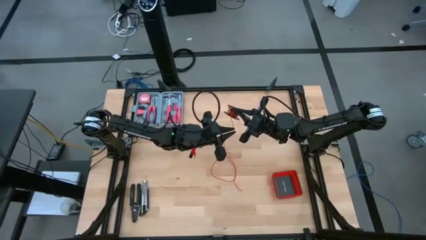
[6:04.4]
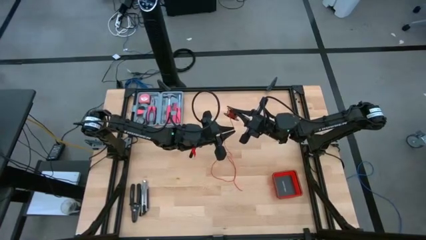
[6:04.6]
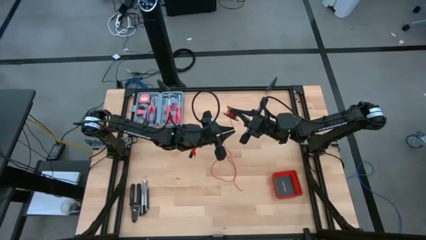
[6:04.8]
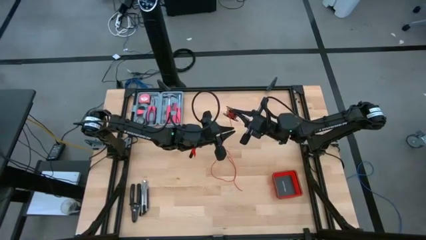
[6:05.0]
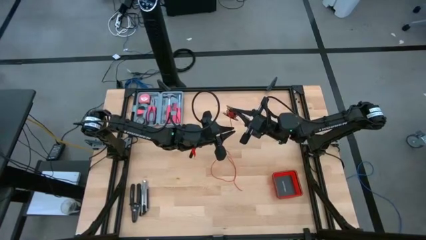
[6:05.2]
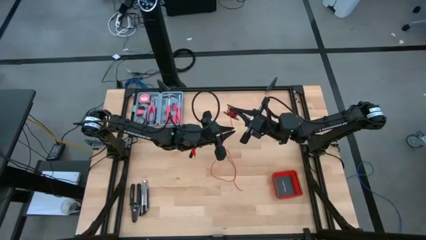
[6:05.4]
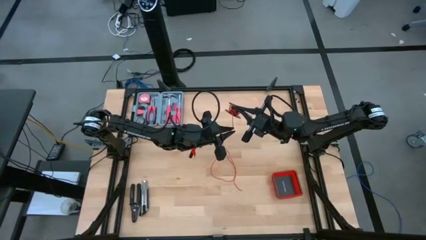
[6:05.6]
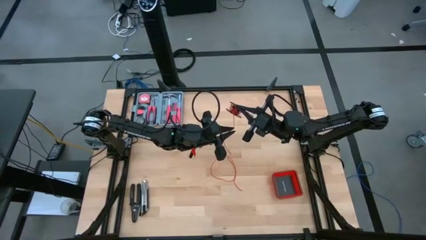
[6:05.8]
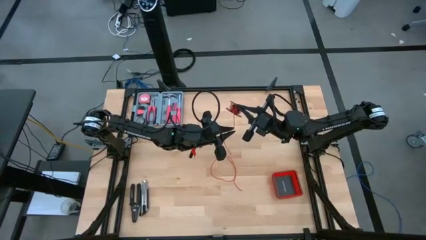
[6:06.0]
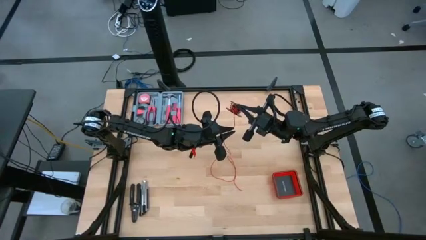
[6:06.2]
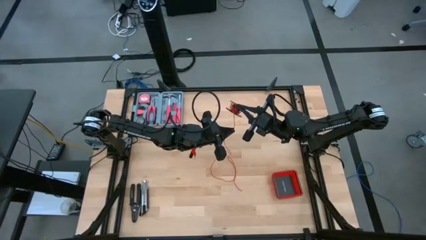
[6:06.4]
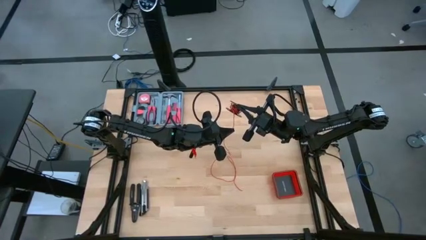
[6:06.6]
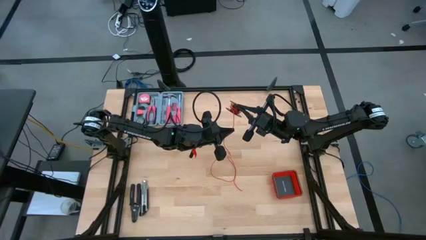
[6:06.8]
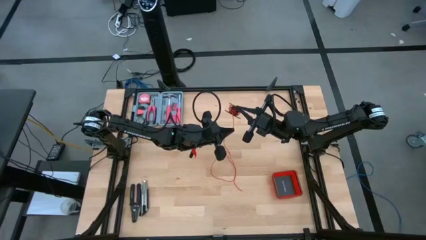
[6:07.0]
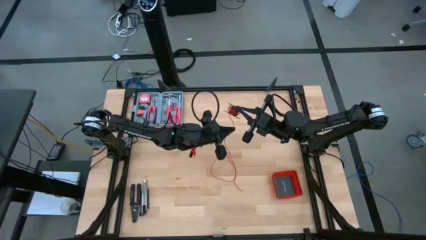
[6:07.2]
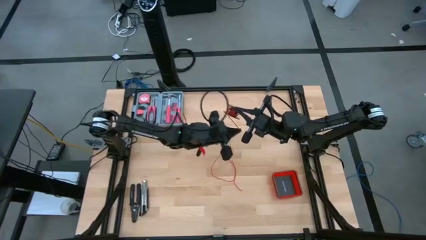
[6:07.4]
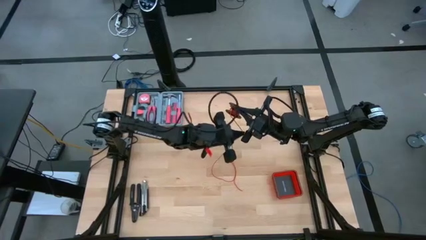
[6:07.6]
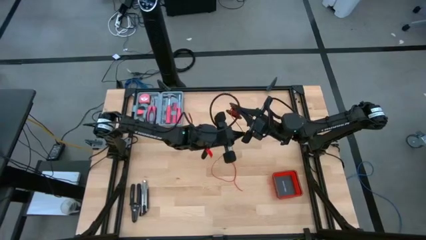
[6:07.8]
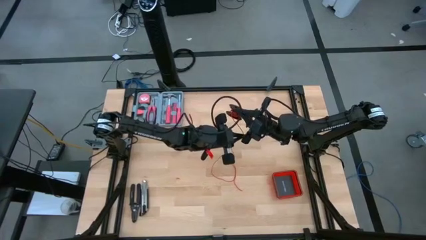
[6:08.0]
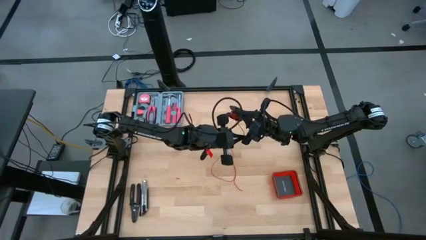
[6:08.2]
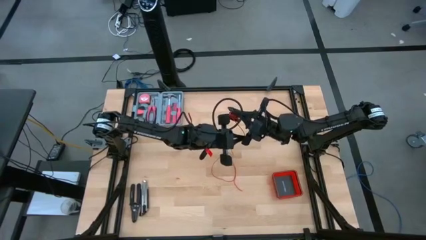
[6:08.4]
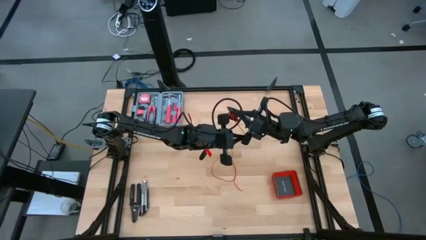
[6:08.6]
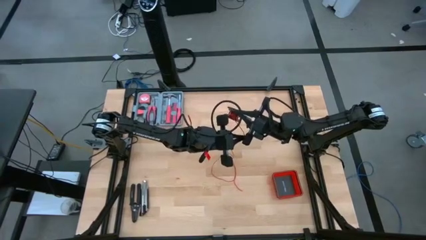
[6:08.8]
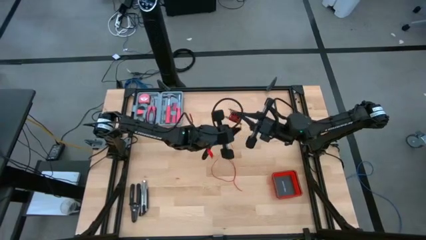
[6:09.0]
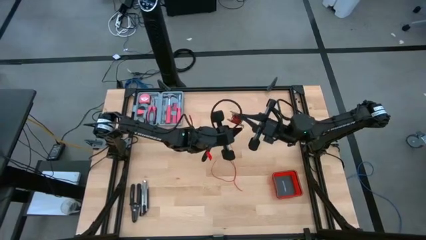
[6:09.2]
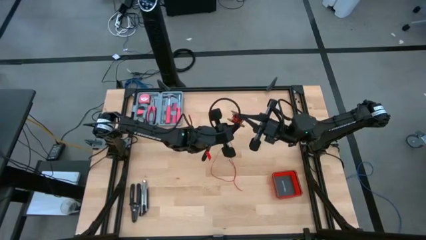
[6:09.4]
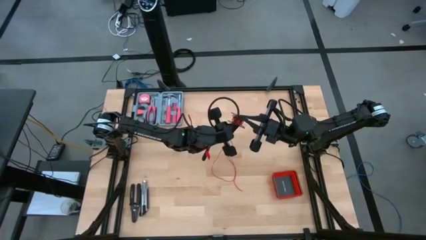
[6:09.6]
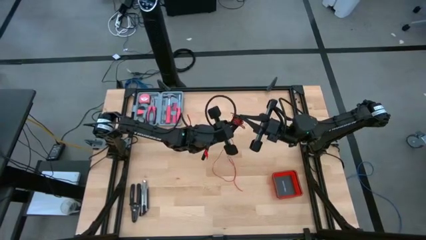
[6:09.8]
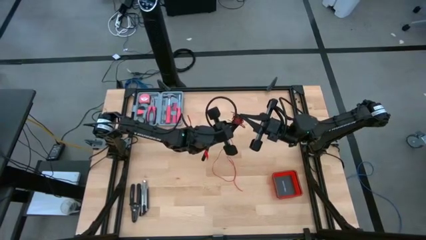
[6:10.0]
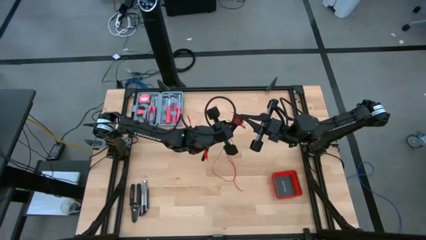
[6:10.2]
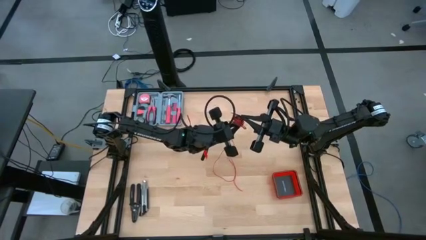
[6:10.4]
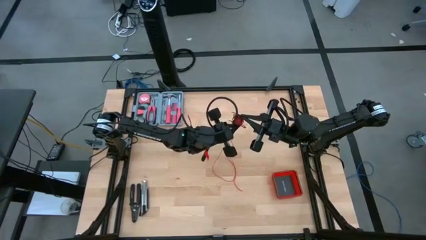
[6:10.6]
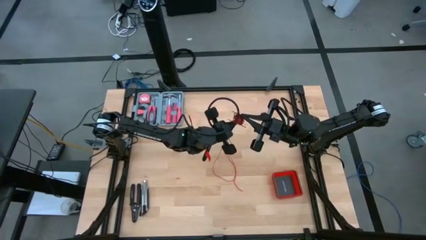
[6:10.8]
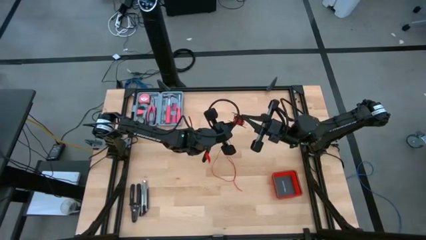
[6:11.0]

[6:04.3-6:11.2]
Task: Coil cords
Coil the red wire onto the spool

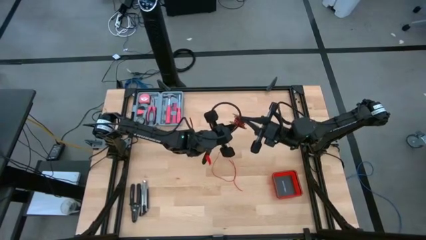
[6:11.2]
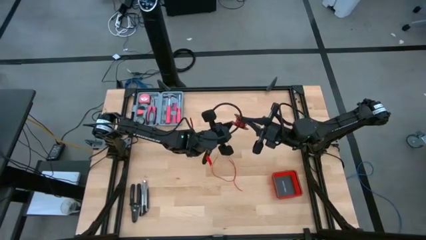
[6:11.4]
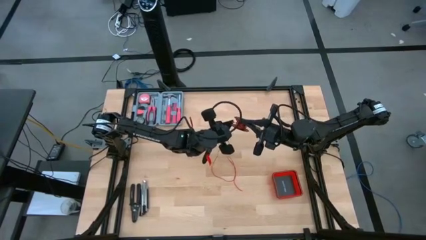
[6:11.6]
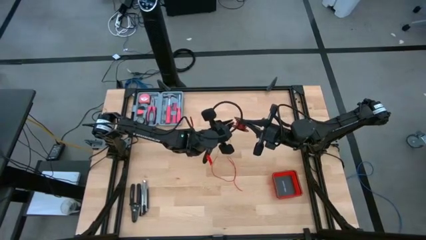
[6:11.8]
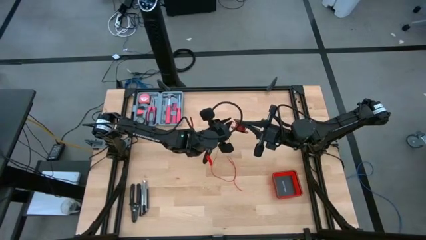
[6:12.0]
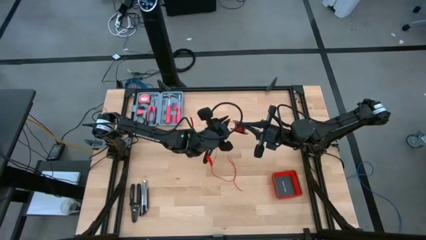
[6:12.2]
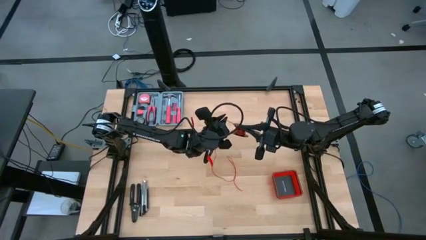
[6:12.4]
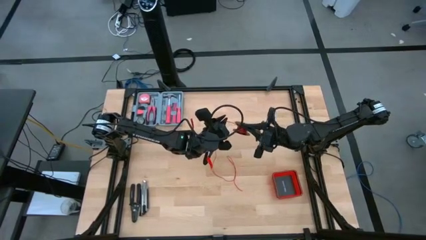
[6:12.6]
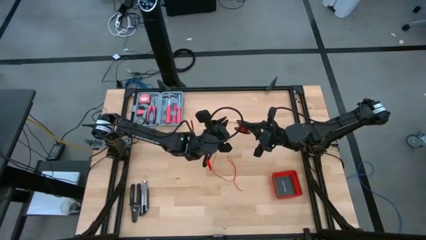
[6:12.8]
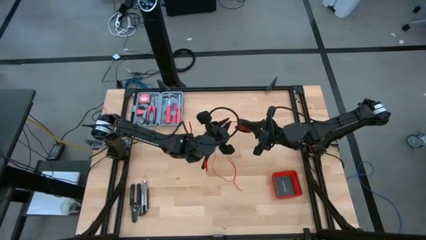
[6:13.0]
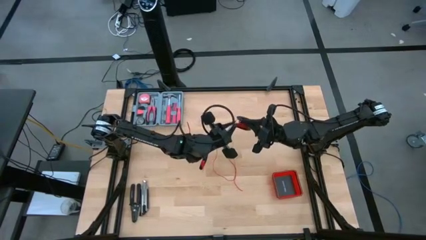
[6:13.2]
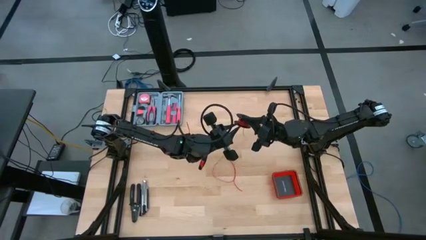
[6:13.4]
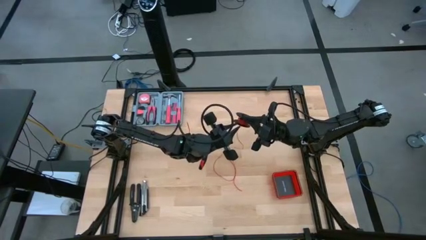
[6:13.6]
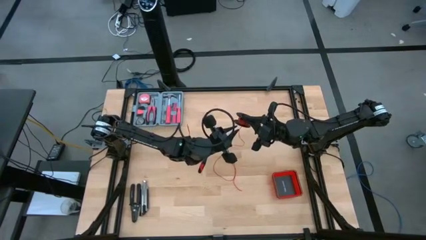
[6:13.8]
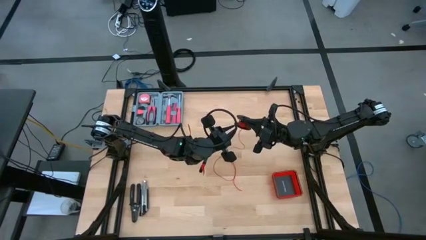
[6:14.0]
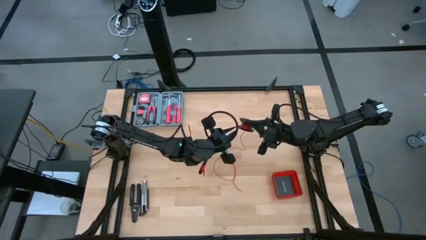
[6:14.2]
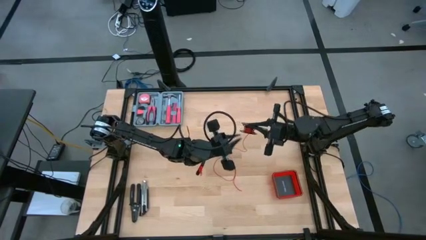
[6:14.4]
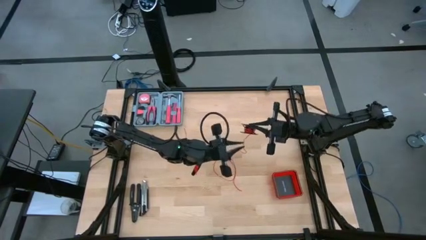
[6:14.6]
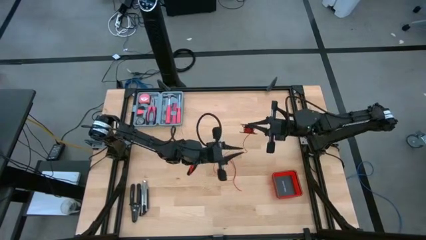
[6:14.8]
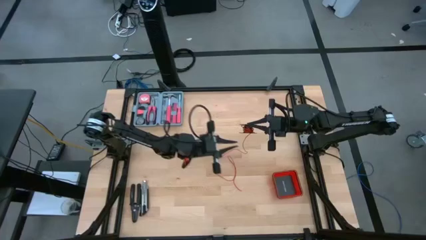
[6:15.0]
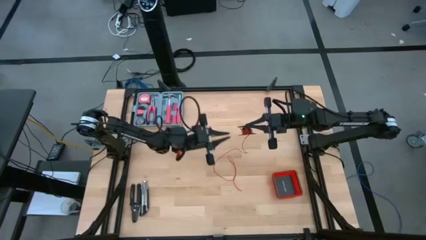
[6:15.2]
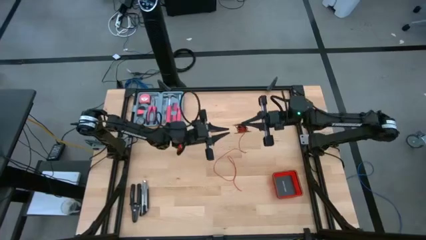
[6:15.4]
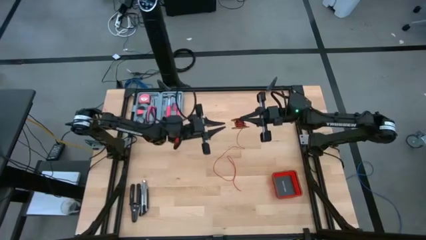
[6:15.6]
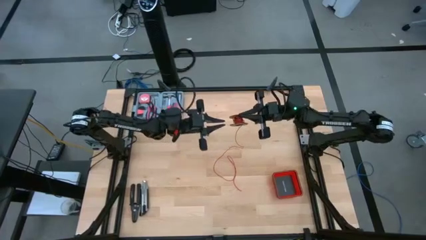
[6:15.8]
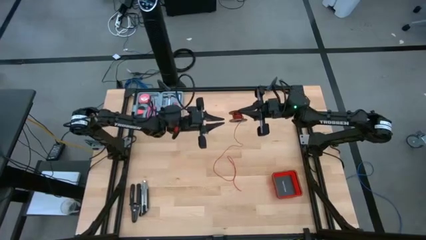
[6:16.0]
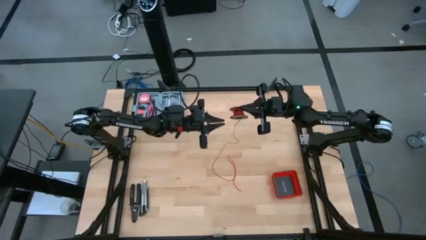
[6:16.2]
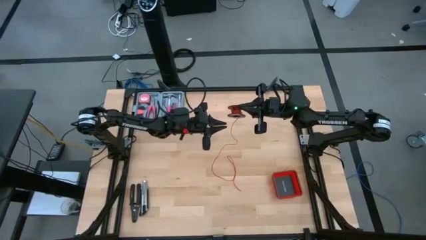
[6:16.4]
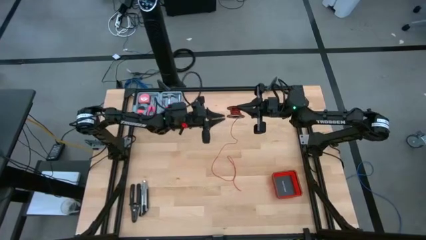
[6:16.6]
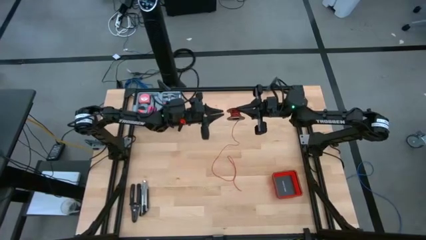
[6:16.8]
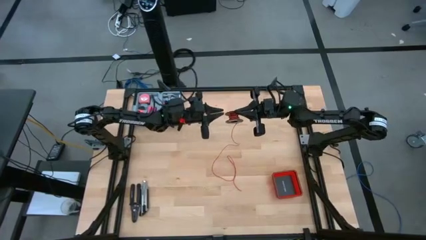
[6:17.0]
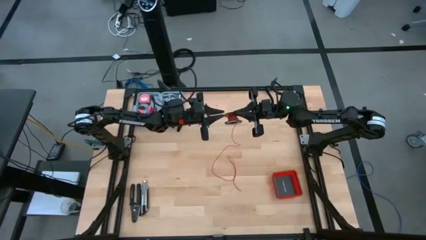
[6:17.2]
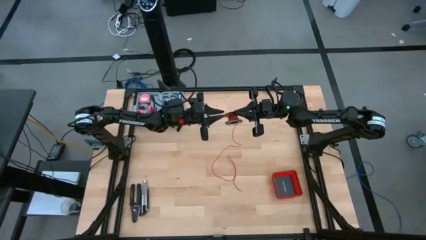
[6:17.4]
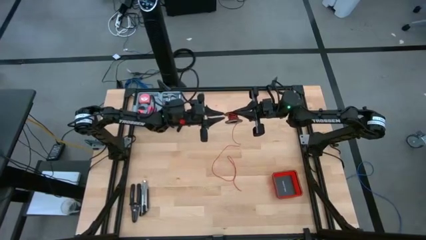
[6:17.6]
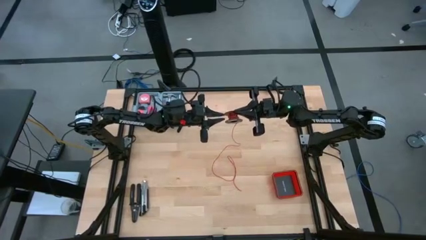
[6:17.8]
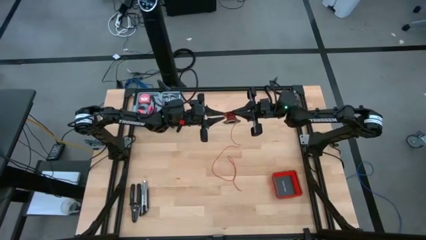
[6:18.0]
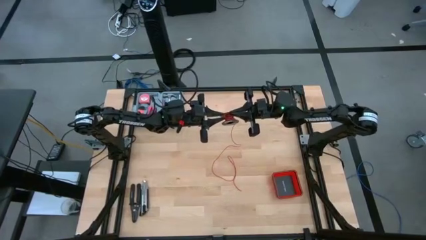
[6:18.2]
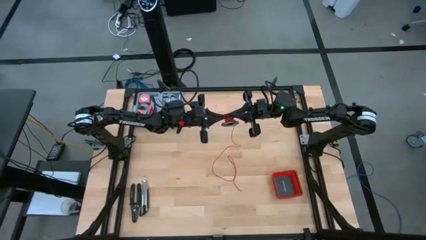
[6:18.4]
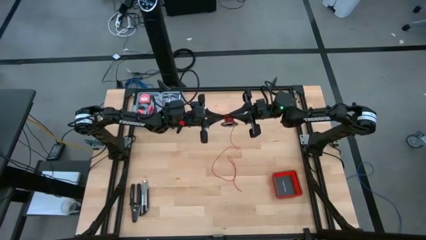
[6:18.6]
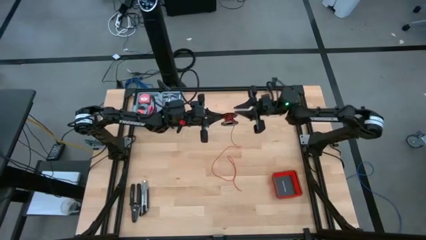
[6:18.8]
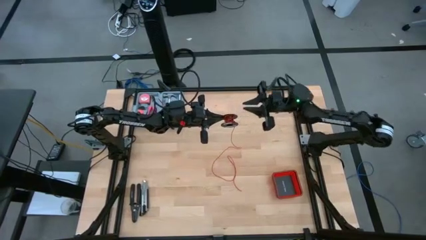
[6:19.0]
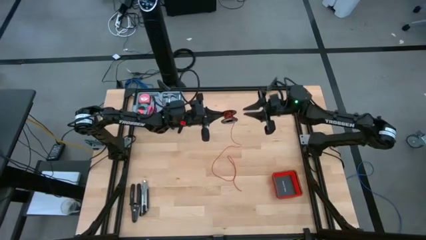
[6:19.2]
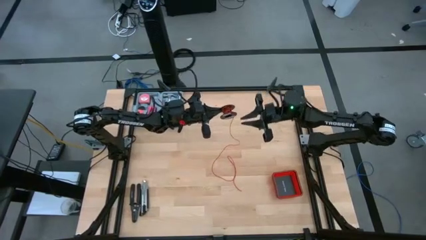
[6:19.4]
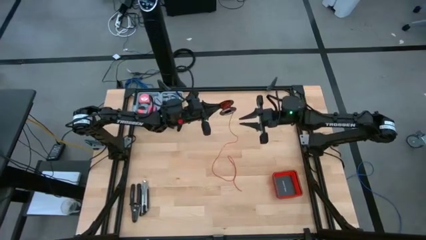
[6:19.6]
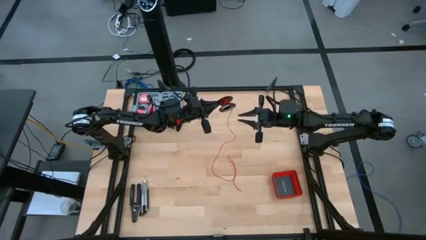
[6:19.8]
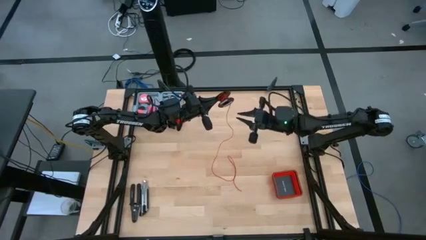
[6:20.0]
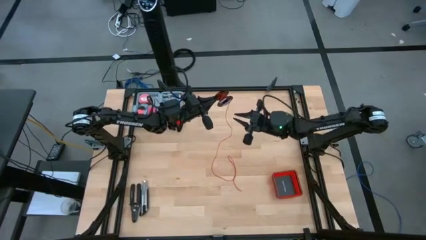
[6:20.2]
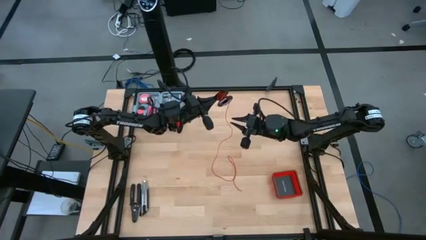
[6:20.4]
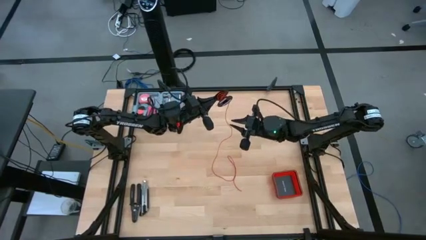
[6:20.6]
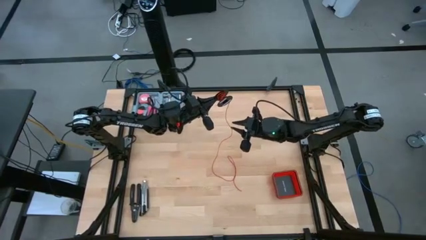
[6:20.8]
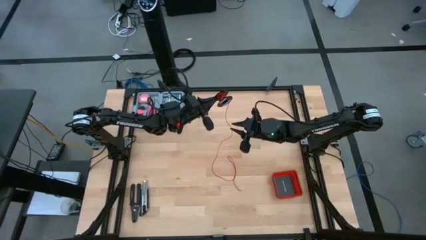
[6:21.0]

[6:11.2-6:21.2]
Coil the red wire onto the spool
